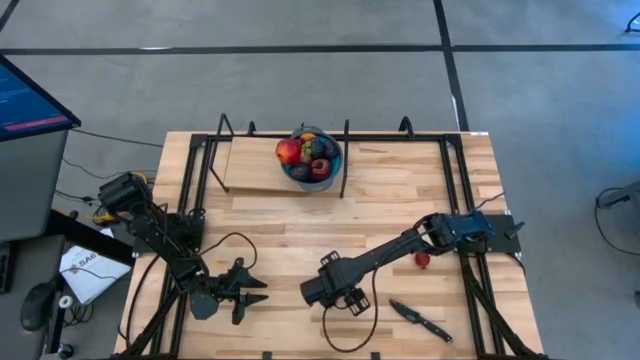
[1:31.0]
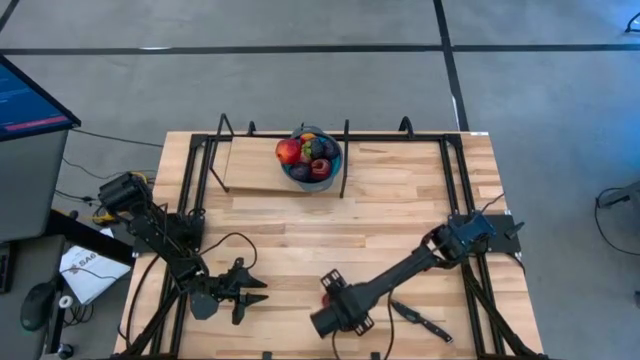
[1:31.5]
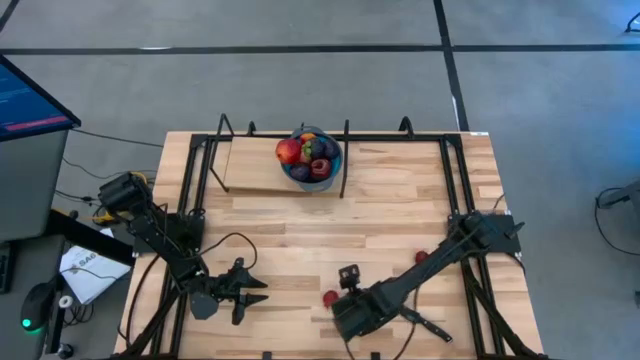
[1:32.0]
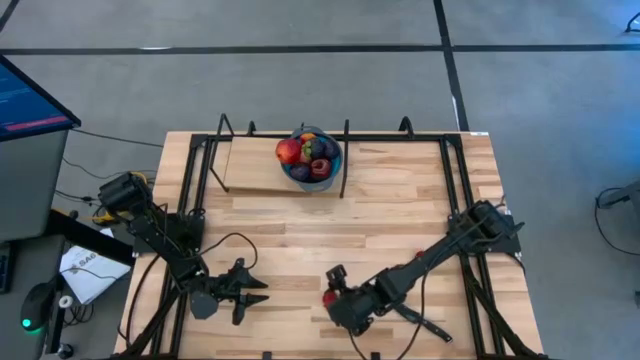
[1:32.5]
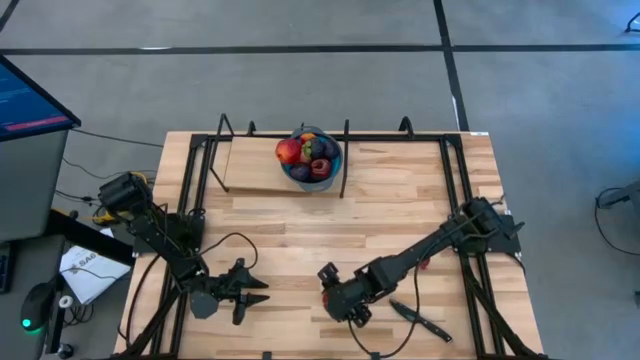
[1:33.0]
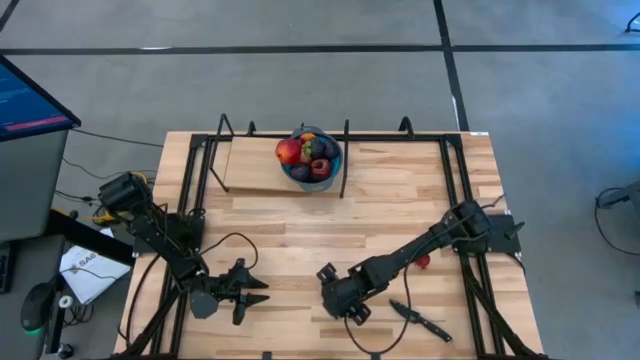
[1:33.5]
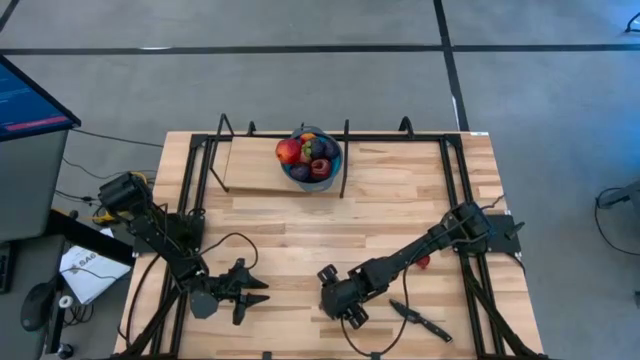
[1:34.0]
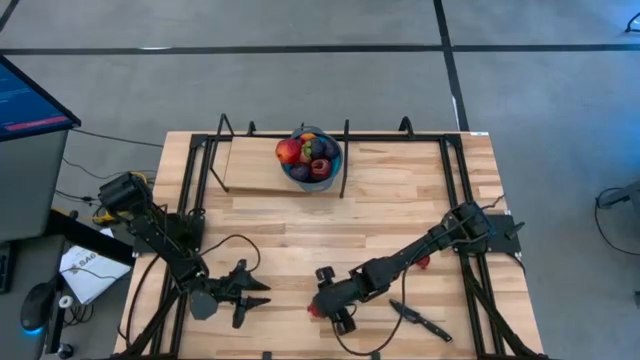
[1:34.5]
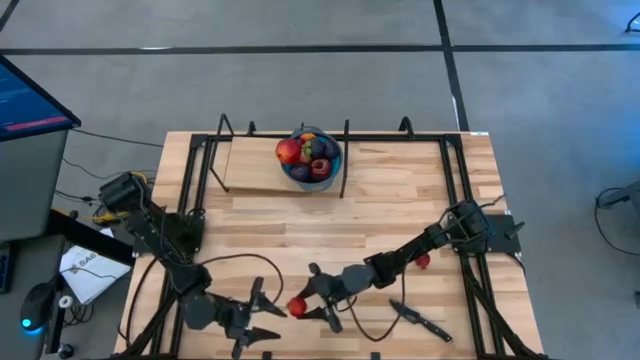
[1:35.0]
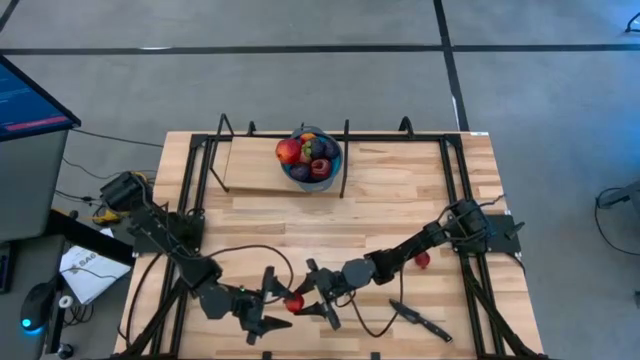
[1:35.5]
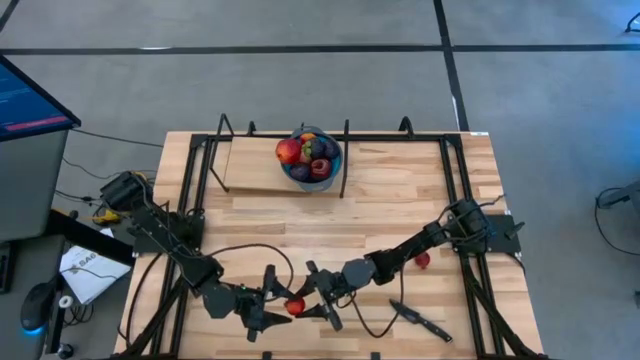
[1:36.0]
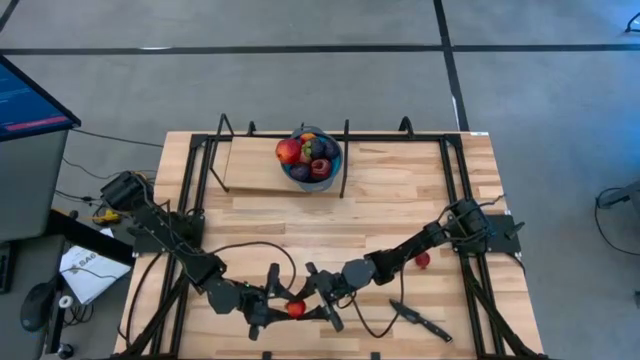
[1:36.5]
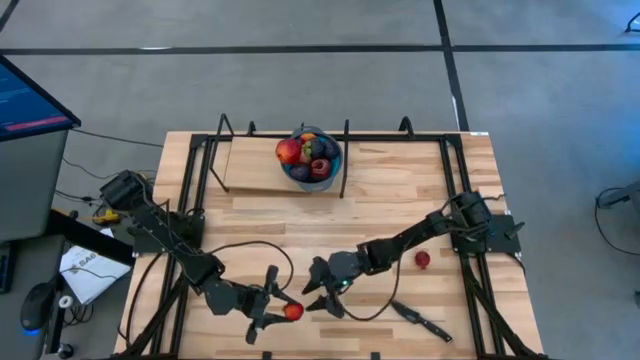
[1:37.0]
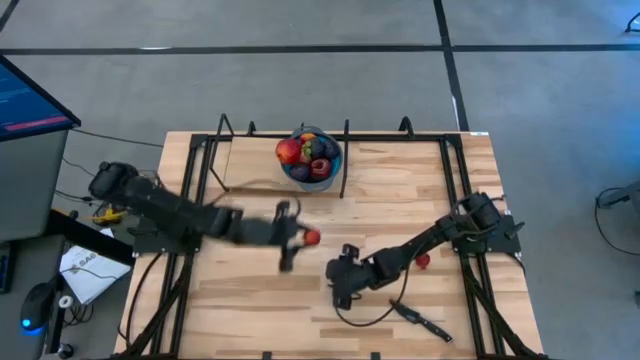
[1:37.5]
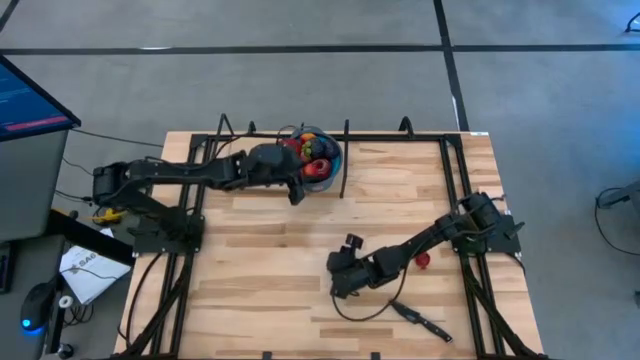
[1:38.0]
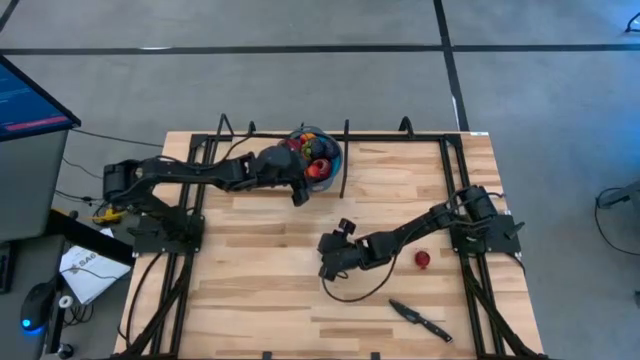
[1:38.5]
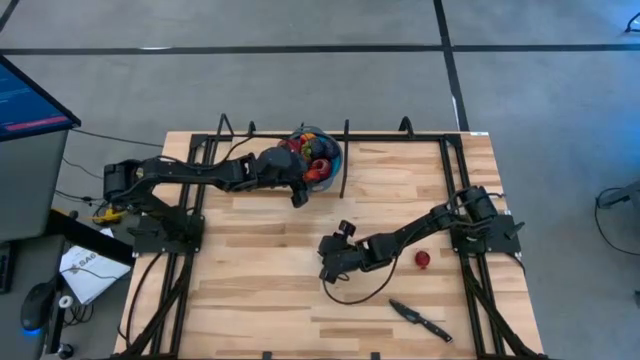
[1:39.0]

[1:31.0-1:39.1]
Task: Pick & Place Fruit
Put the left red pomegranate into the blue strainer bowl on the shelf

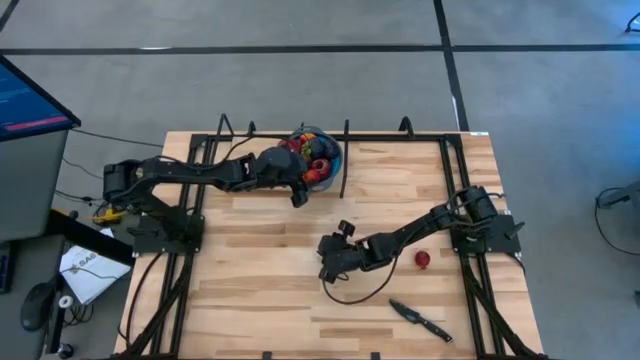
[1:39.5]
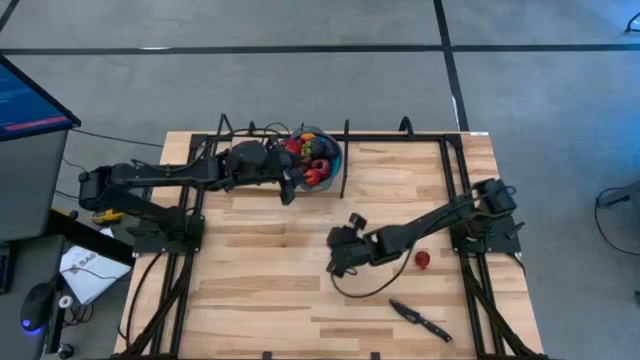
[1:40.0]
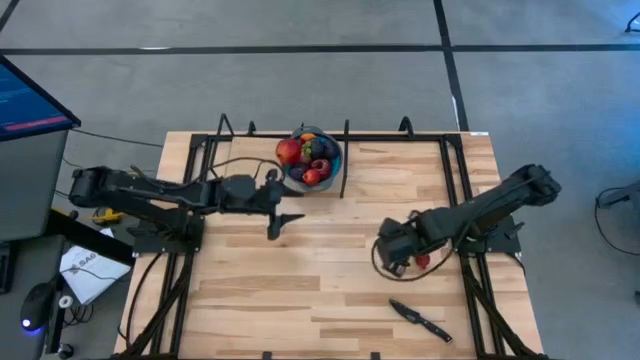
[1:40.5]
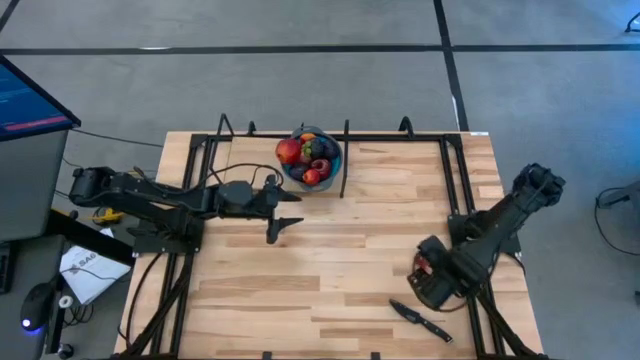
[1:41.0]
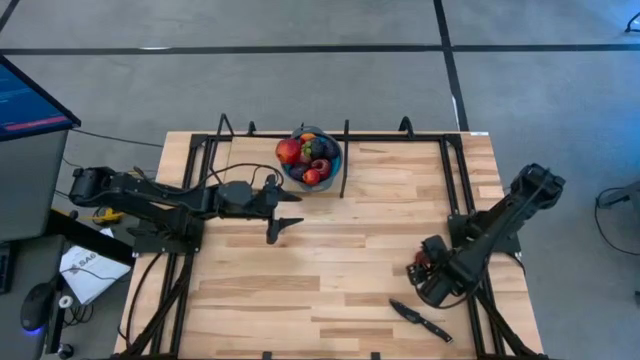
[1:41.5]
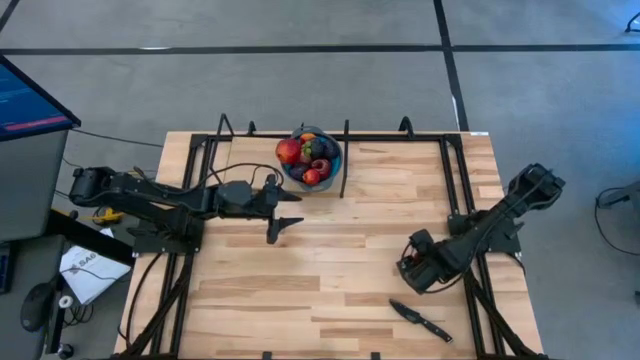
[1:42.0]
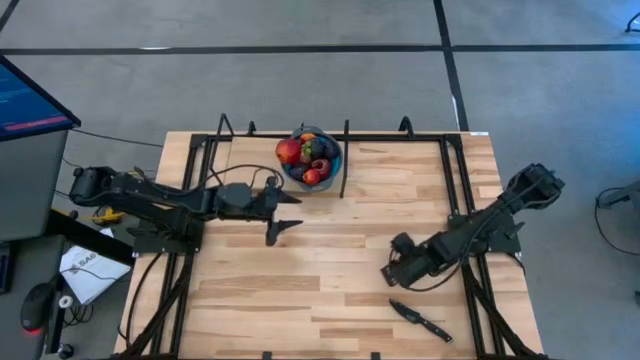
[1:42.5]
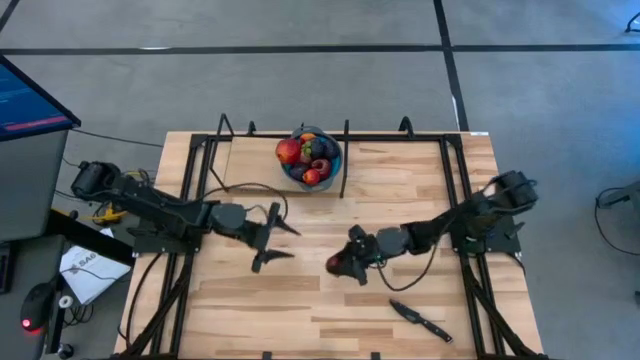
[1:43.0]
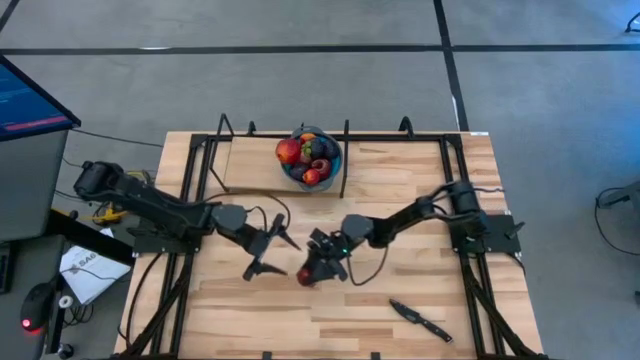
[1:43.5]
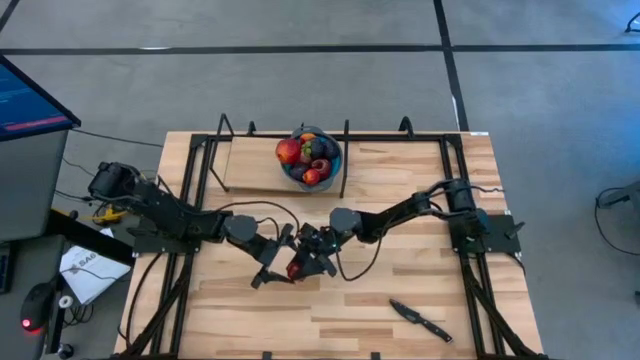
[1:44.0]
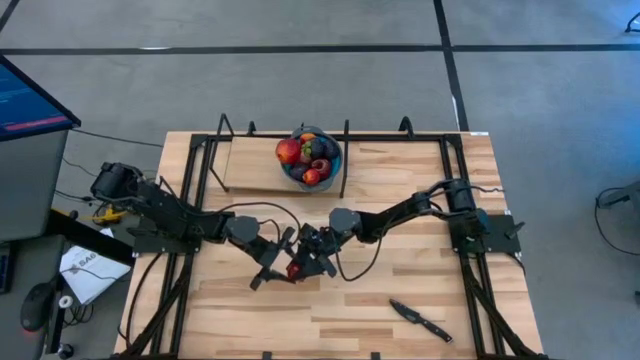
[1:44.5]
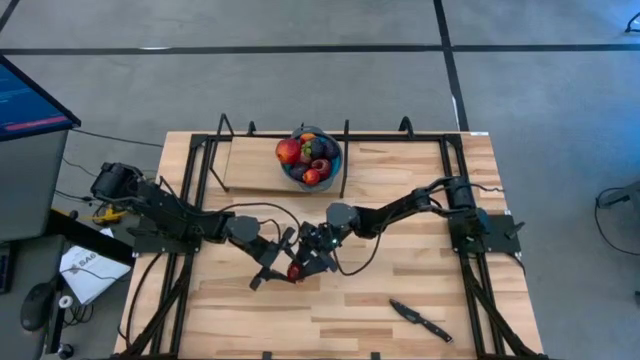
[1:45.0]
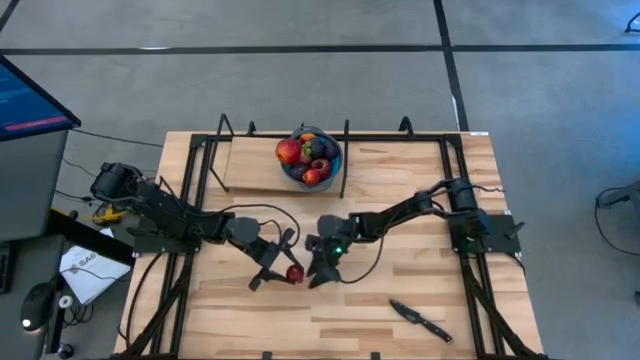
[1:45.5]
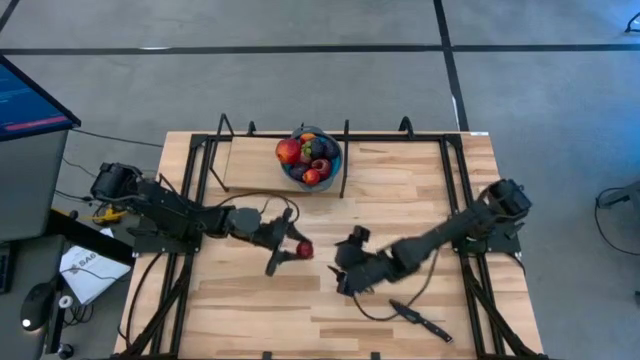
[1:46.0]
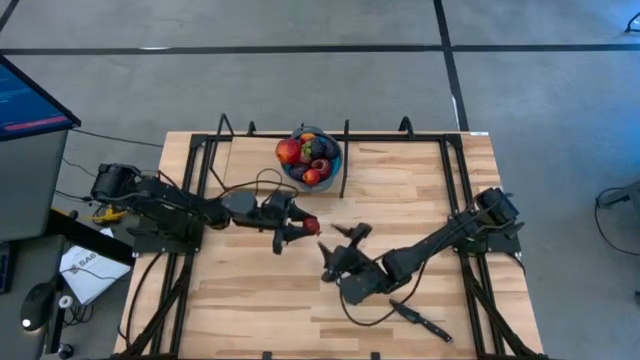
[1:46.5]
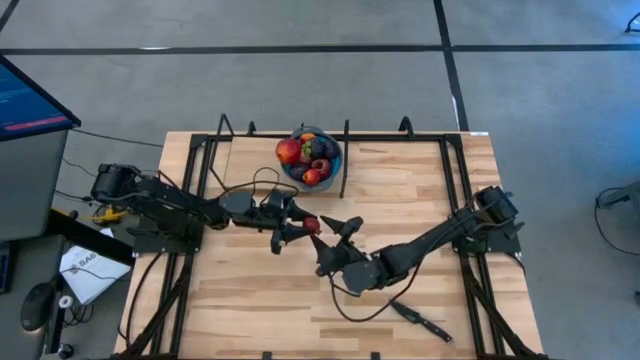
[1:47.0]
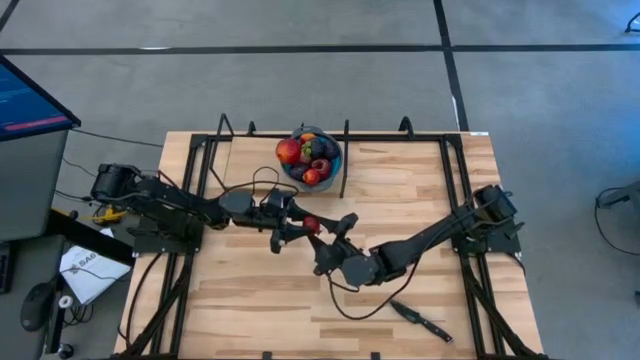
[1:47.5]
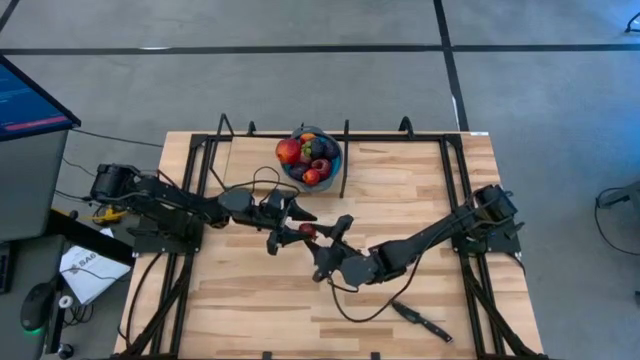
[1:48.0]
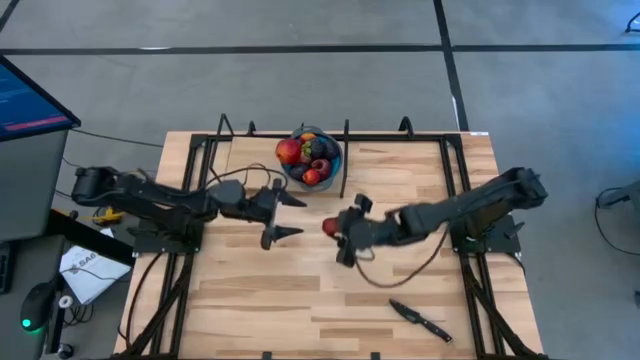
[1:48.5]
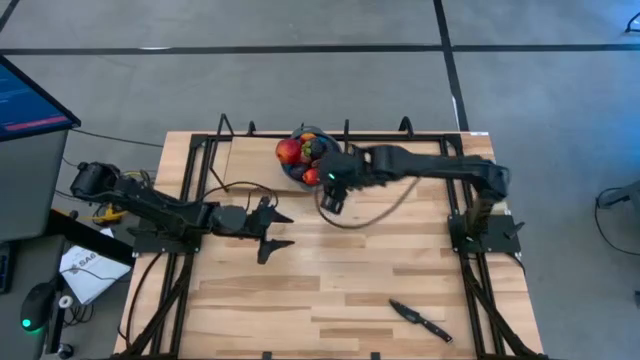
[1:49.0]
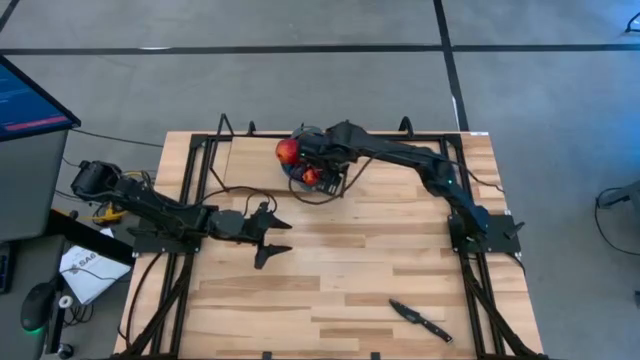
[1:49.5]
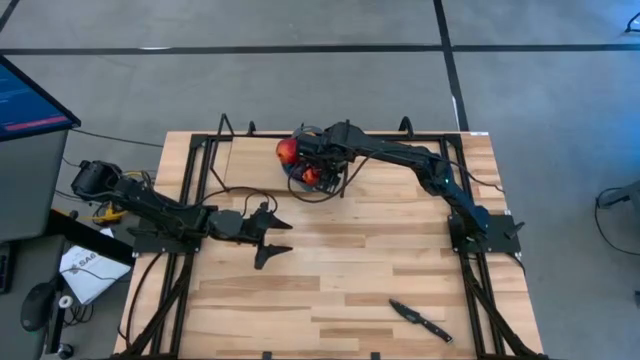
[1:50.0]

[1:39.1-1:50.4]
Put the red pomegranate into the blue strainer bowl on the shelf

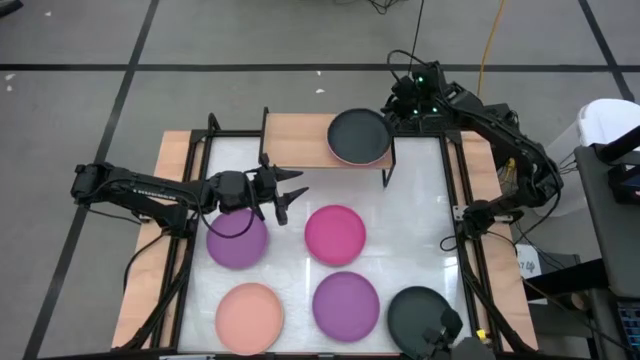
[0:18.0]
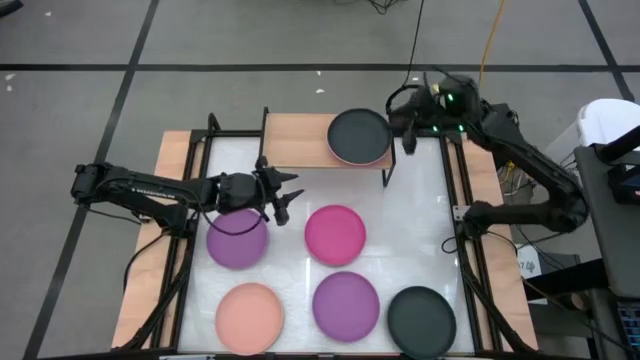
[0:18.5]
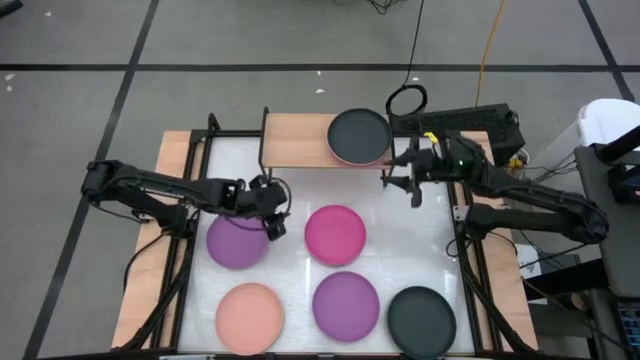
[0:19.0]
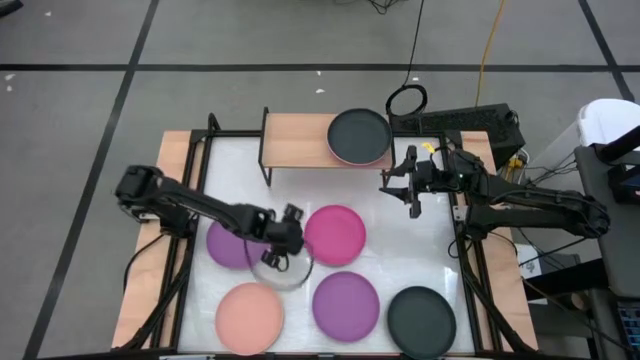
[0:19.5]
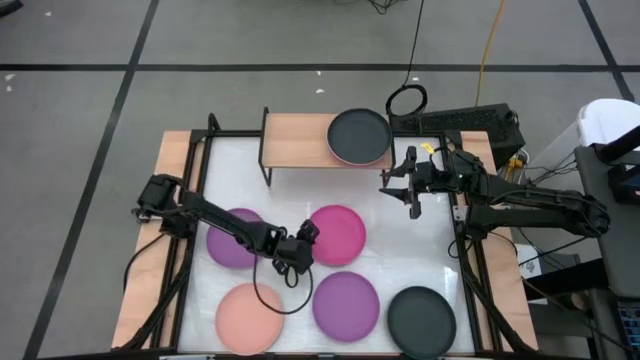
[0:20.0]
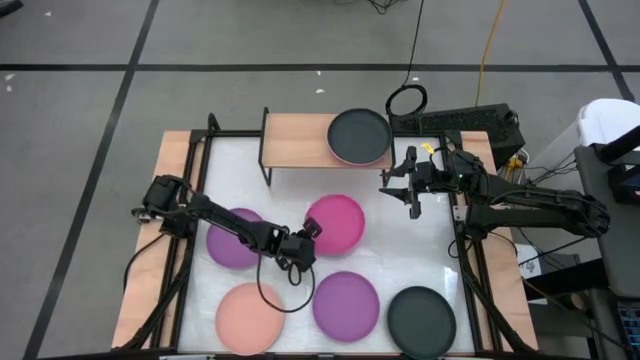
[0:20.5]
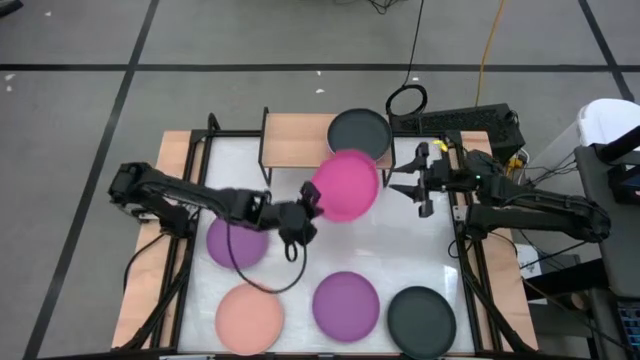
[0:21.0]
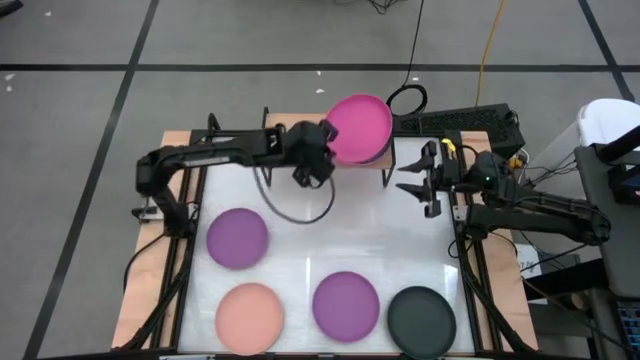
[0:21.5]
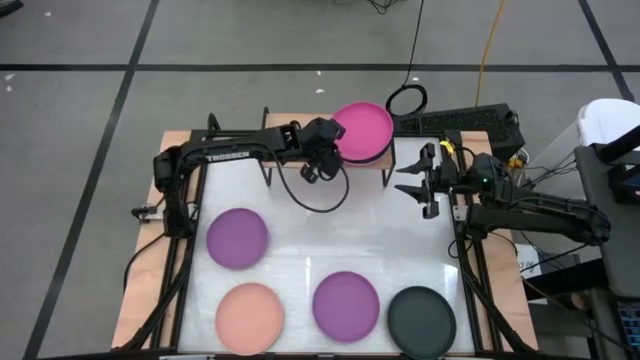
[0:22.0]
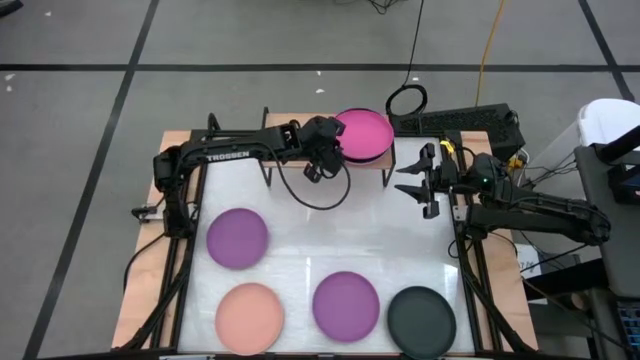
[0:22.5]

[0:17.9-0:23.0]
Task: Place and stack plates onto a shelf
Stack the pink plate on top of the black plate on the shelf
